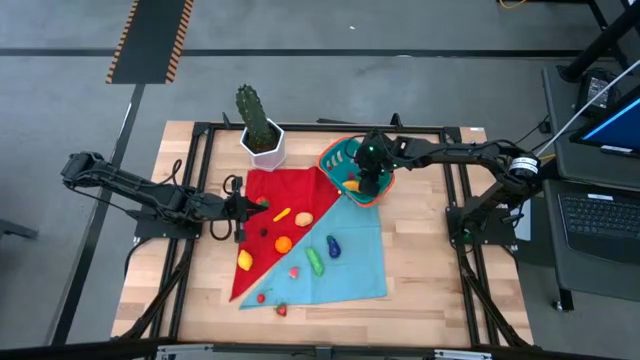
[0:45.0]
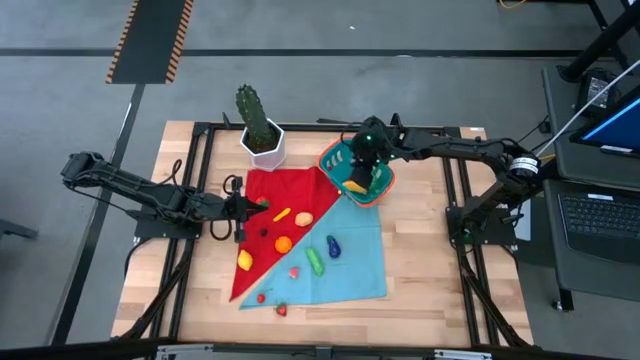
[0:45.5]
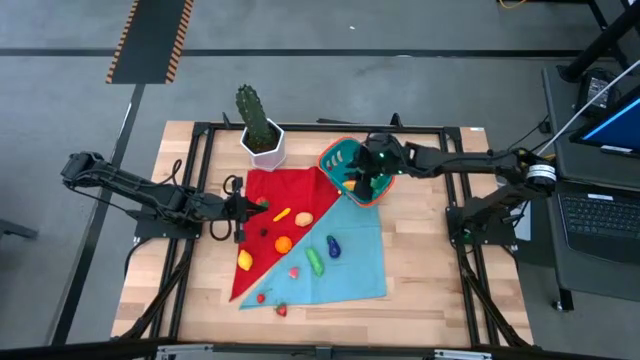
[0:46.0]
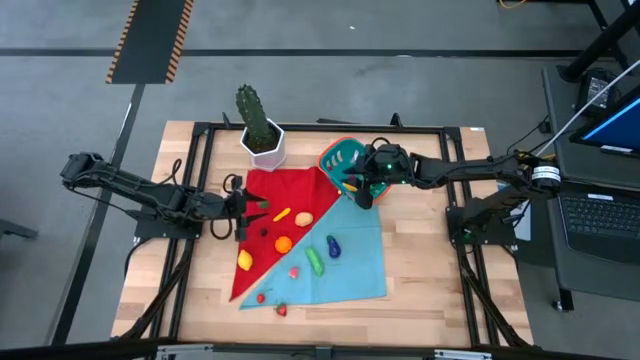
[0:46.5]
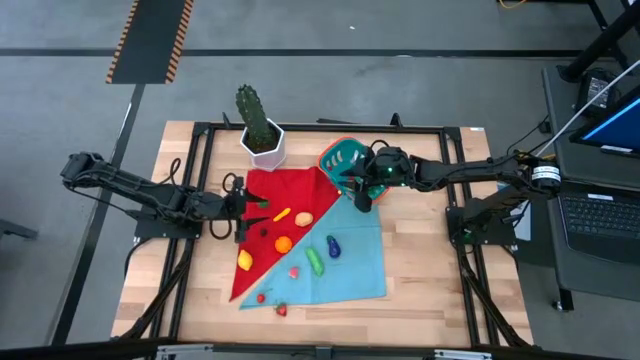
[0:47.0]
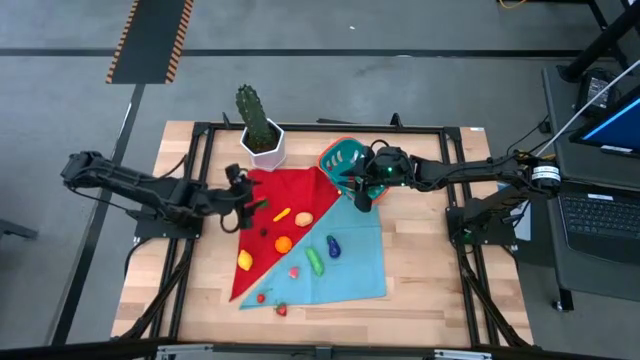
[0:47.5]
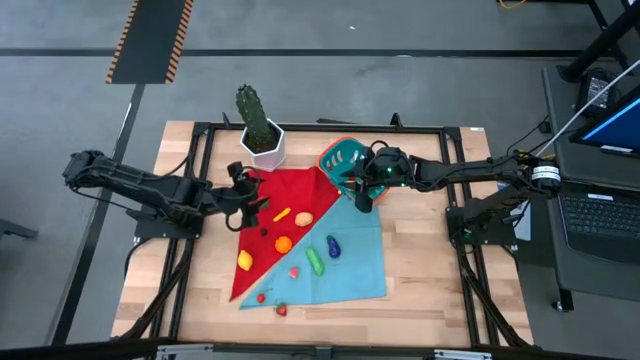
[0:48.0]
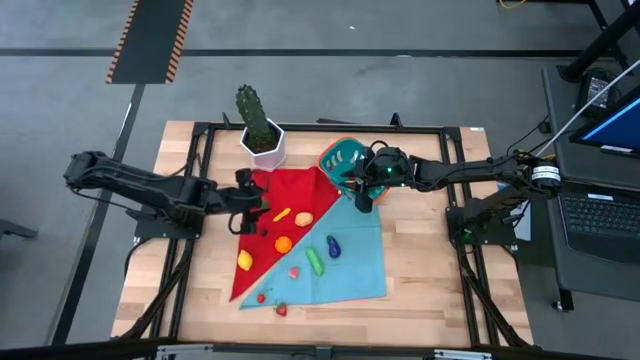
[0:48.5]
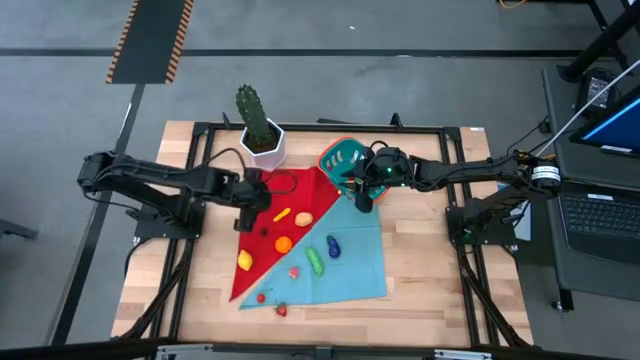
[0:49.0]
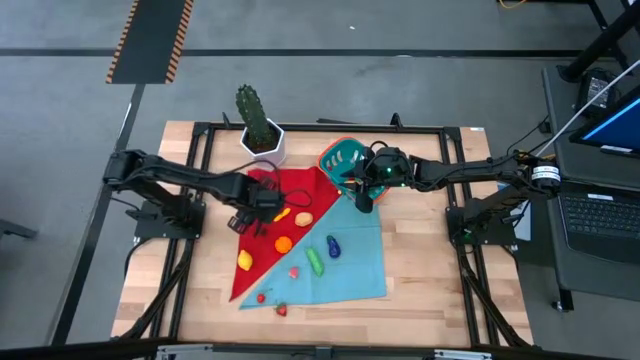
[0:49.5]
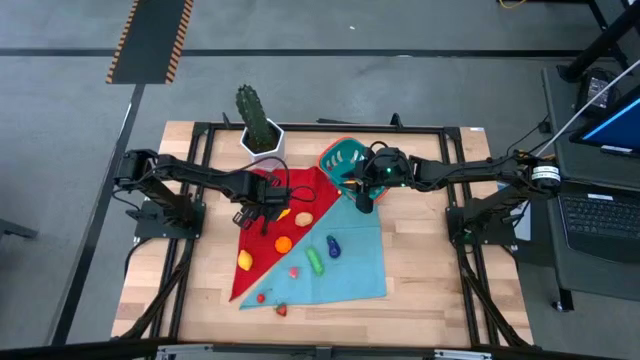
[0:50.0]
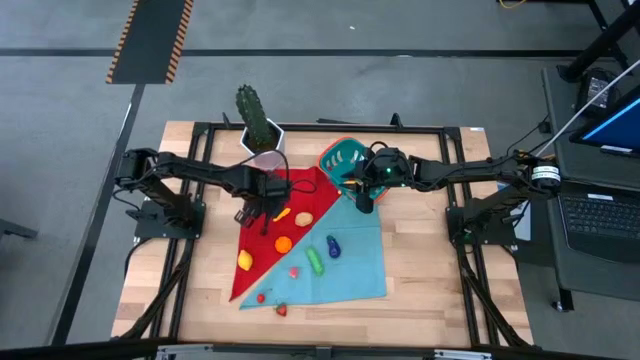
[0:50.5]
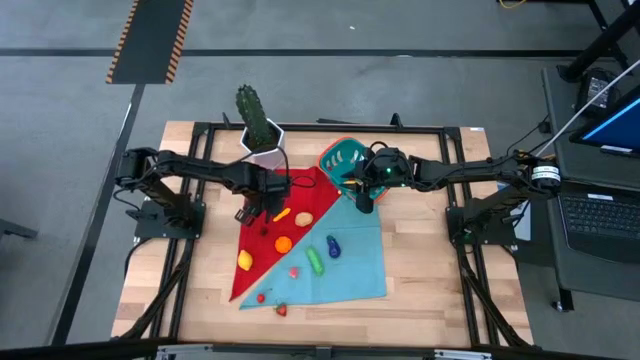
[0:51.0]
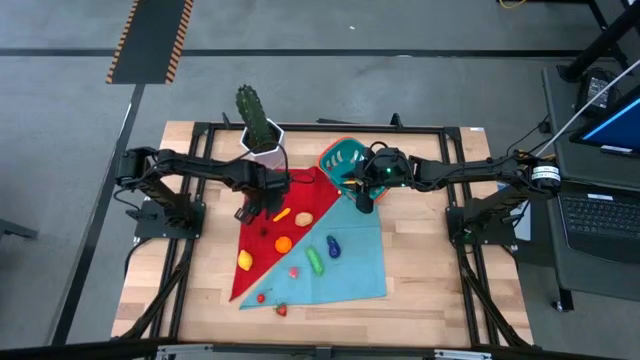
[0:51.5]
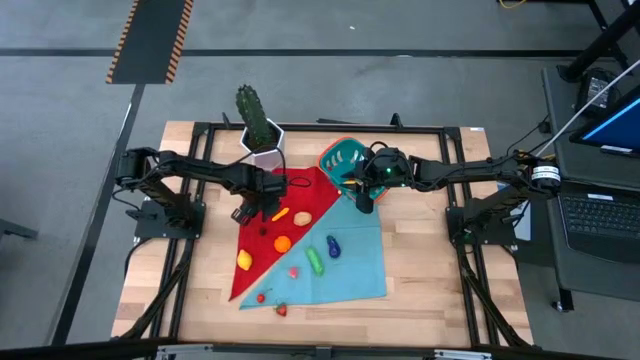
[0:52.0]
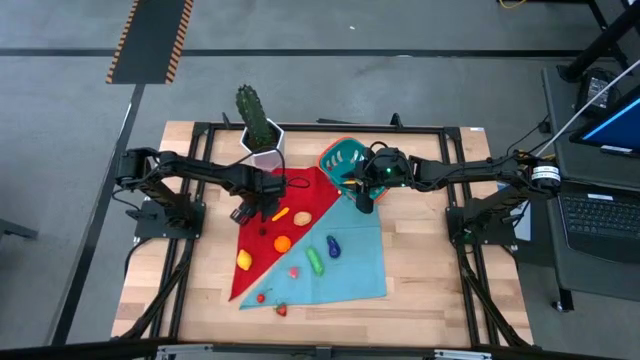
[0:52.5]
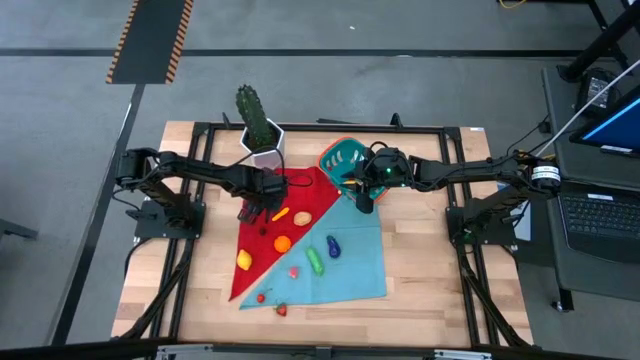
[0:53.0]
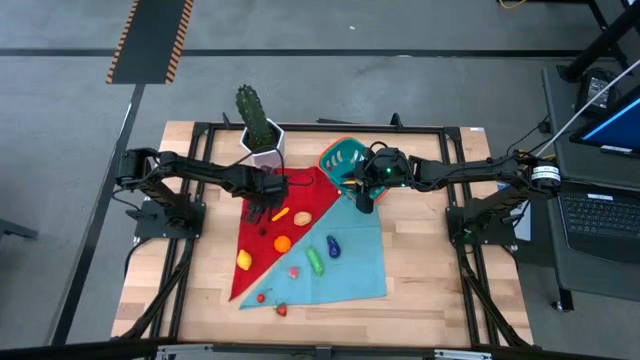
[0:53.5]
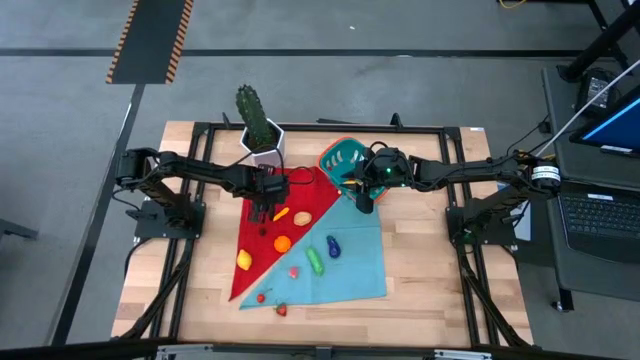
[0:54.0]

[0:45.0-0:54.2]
Task: Build produce basket
Put the top red strawberry into the blue basket

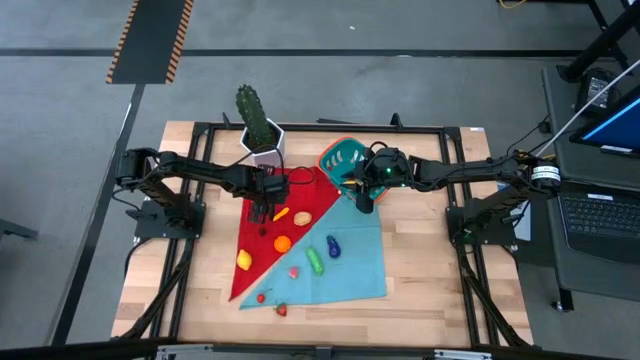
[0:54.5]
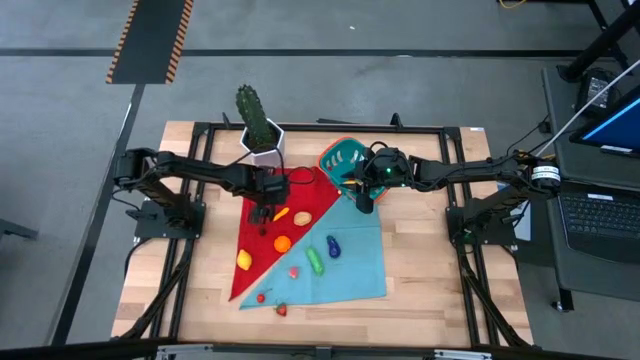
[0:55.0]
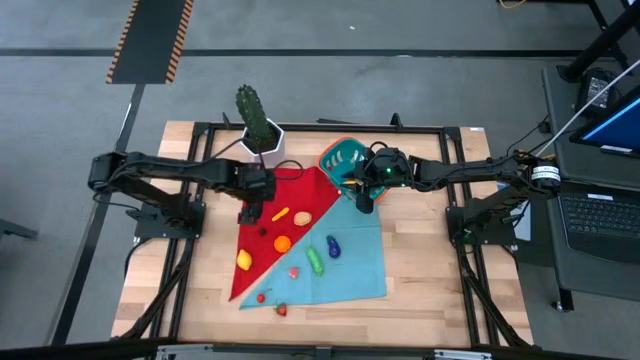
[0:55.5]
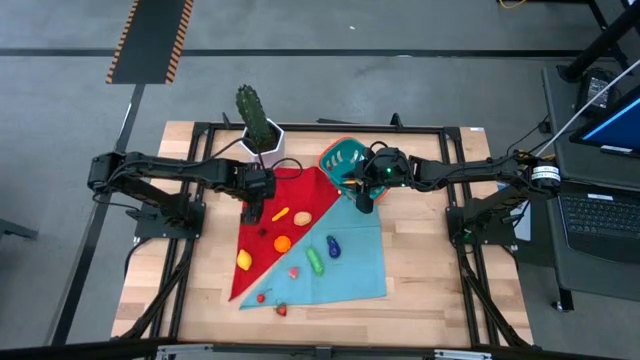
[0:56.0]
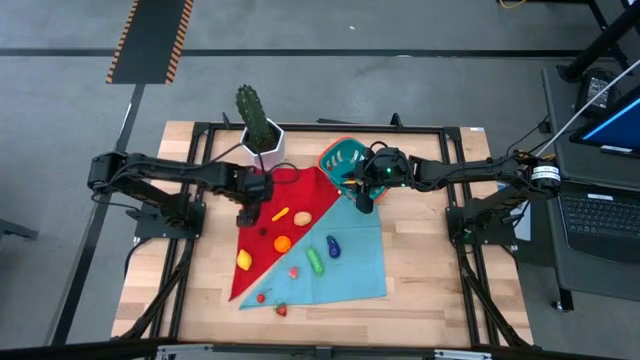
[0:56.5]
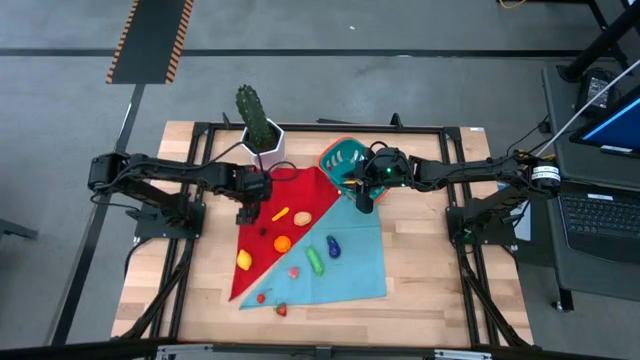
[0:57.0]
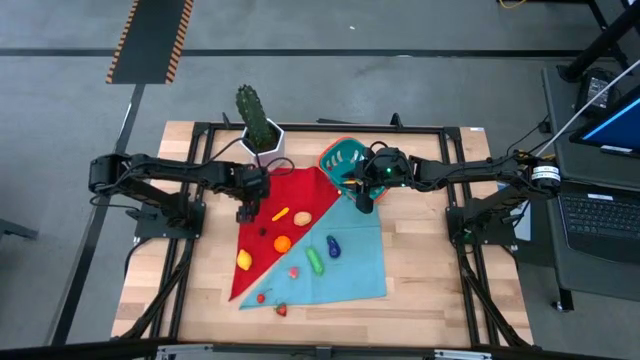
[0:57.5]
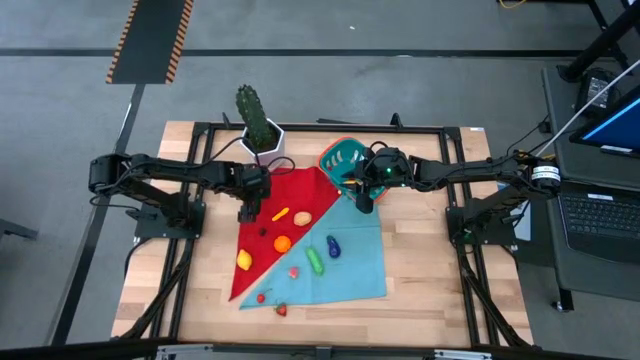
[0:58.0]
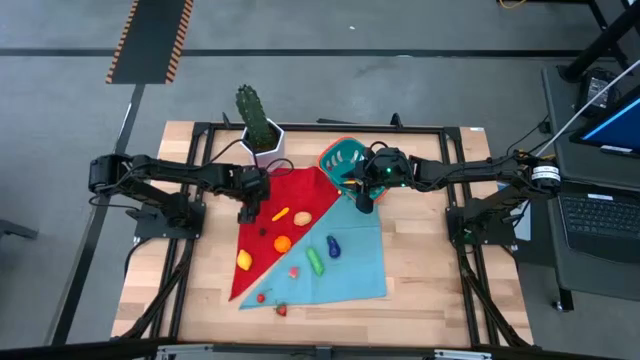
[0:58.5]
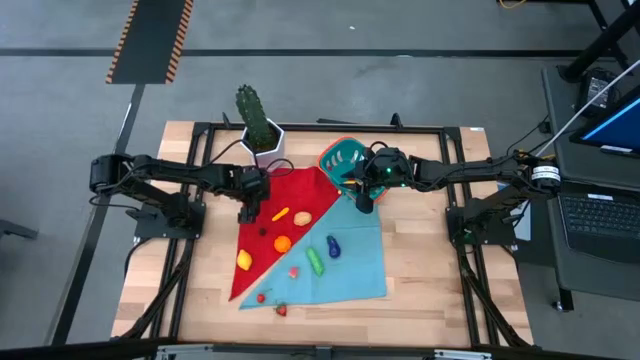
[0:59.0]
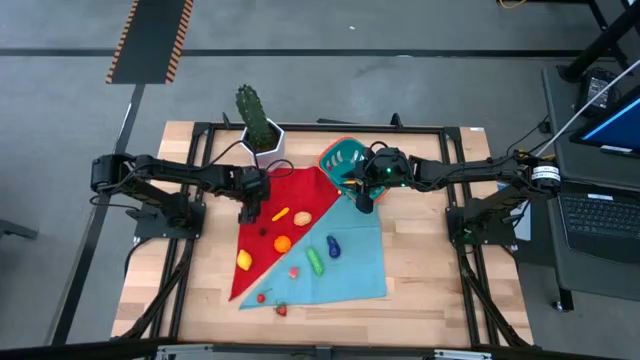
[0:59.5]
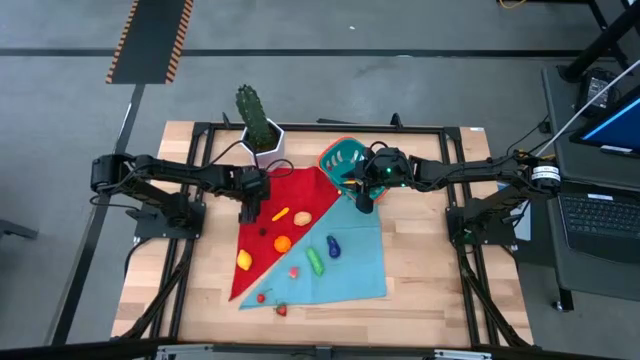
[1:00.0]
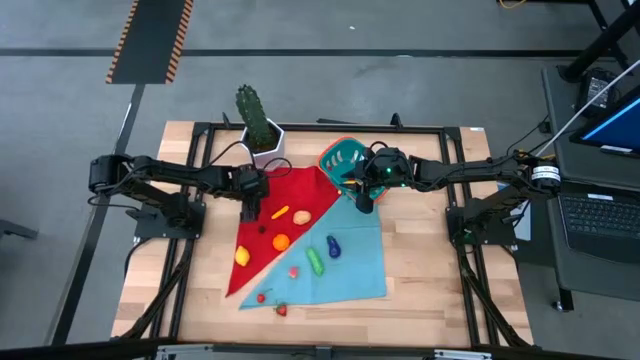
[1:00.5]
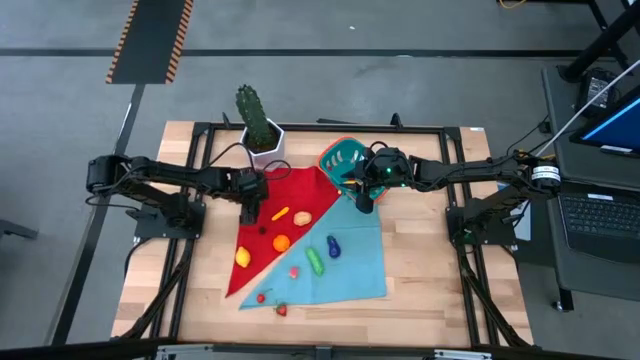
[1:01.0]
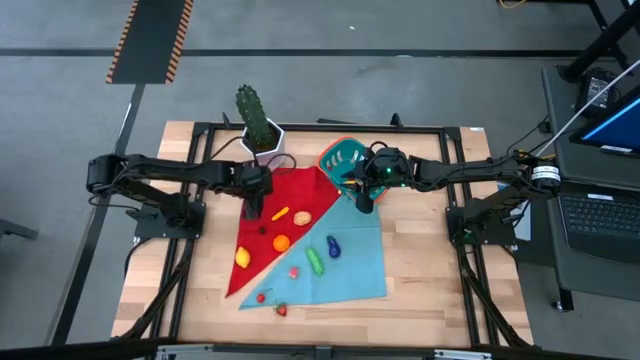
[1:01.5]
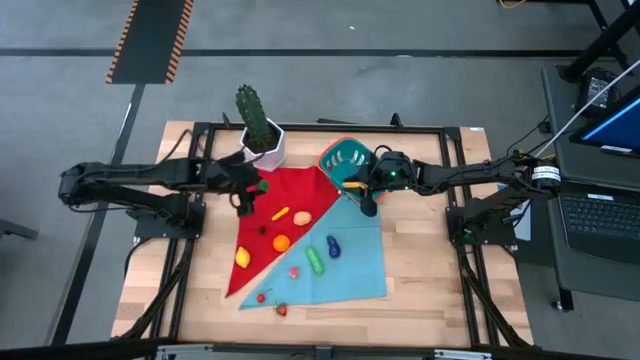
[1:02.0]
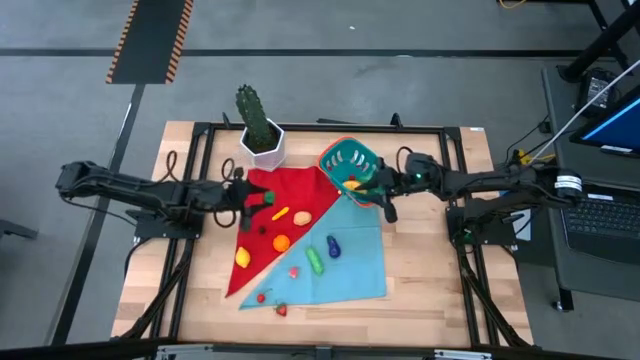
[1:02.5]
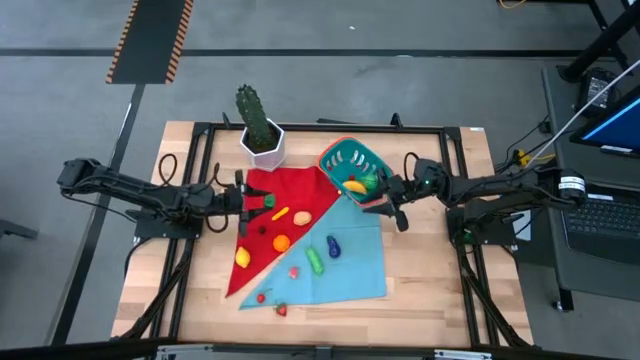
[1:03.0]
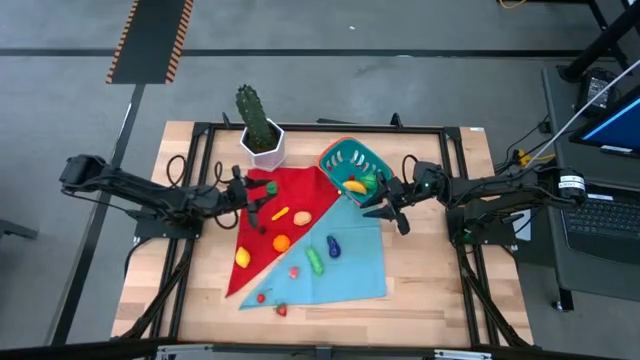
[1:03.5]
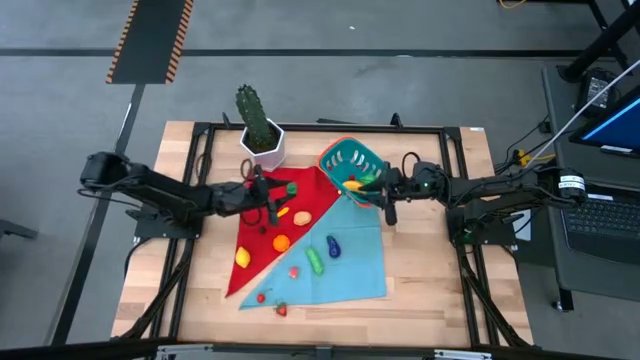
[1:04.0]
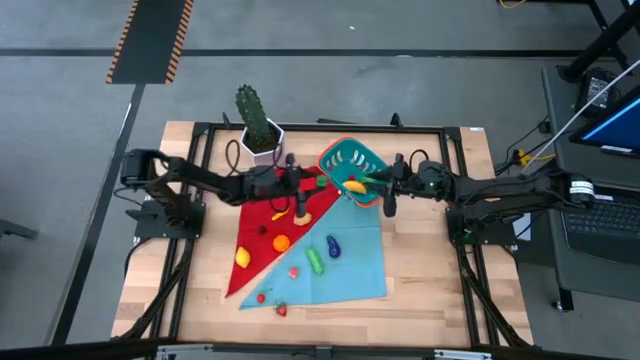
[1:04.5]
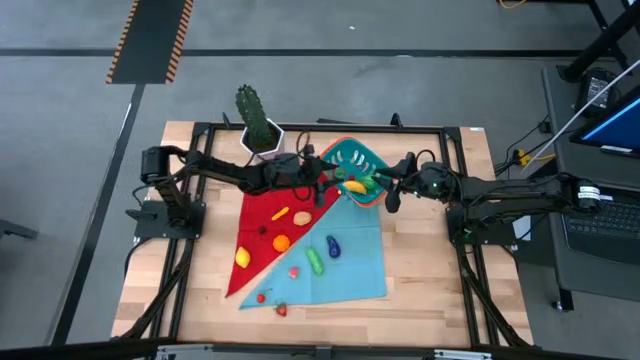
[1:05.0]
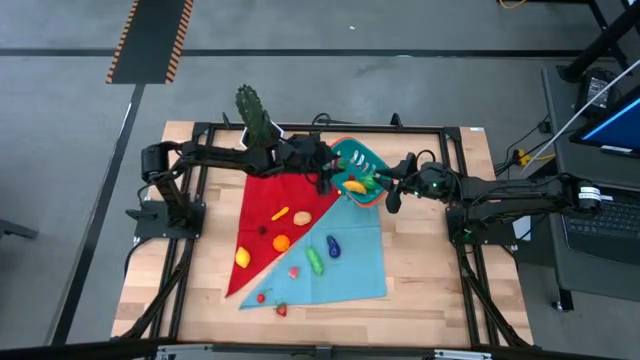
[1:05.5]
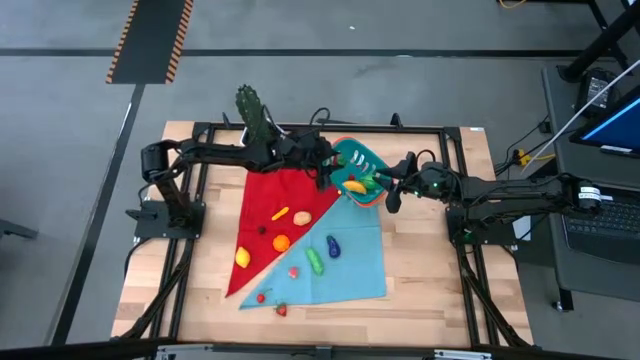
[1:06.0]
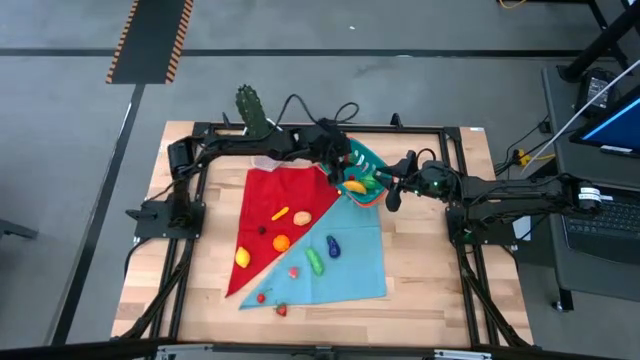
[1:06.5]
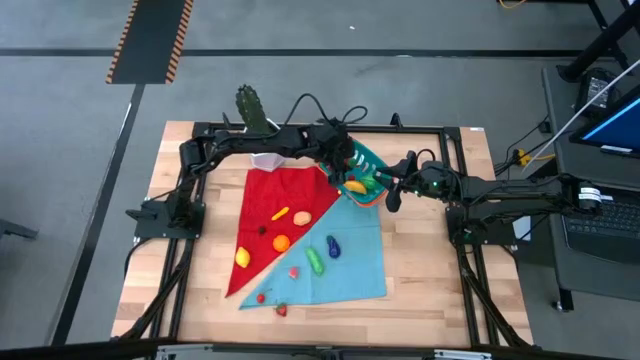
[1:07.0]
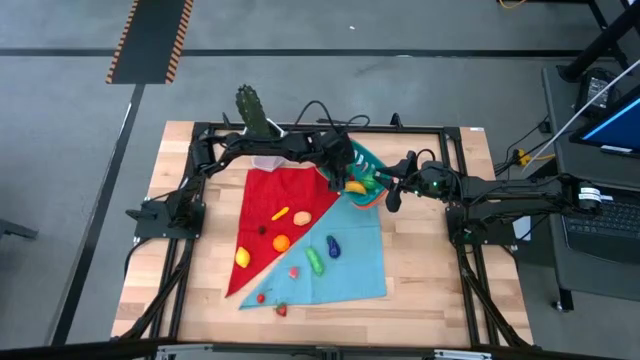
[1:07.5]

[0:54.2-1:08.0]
Put the top red strawberry into the blue basket
